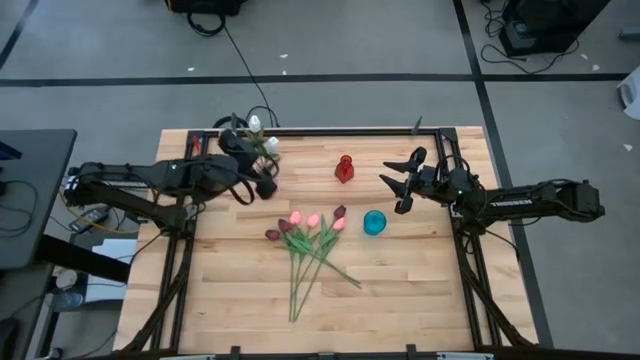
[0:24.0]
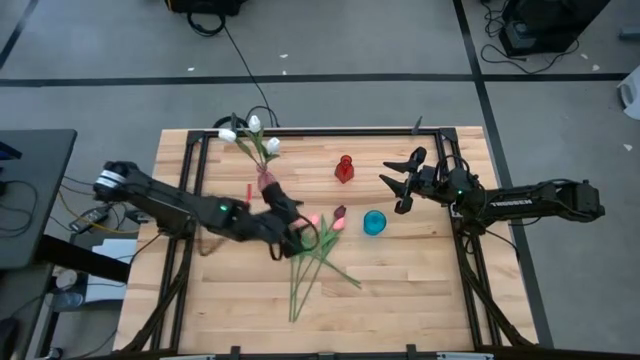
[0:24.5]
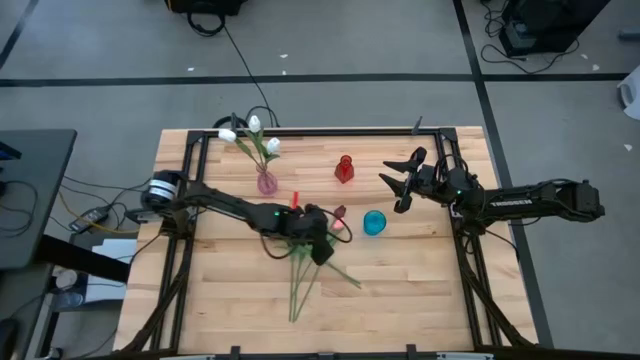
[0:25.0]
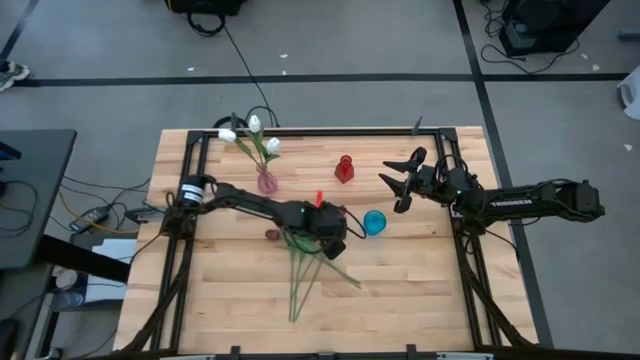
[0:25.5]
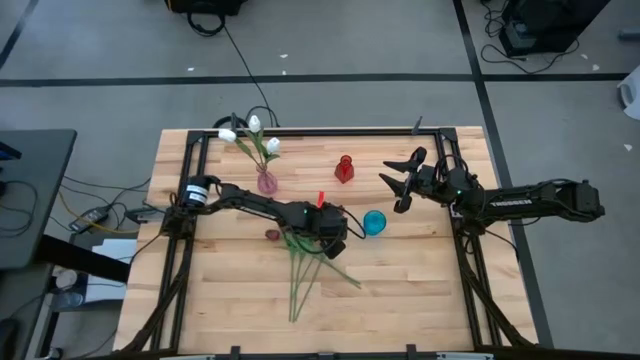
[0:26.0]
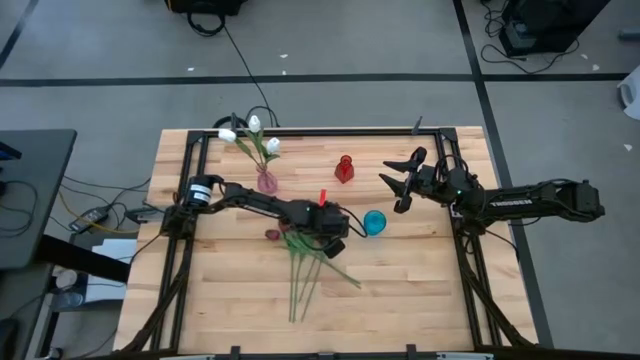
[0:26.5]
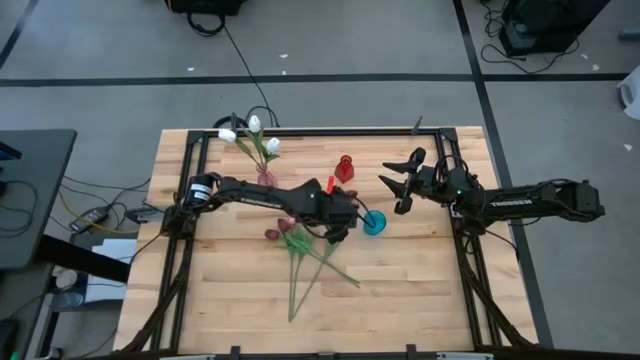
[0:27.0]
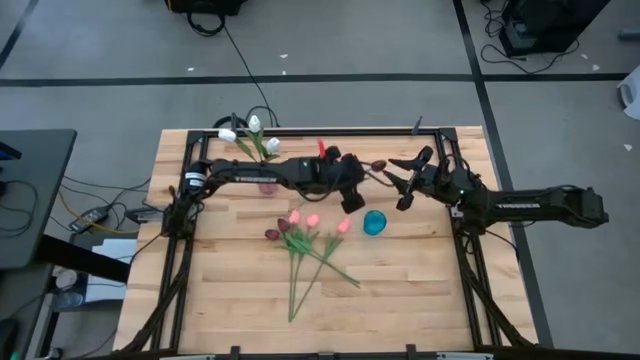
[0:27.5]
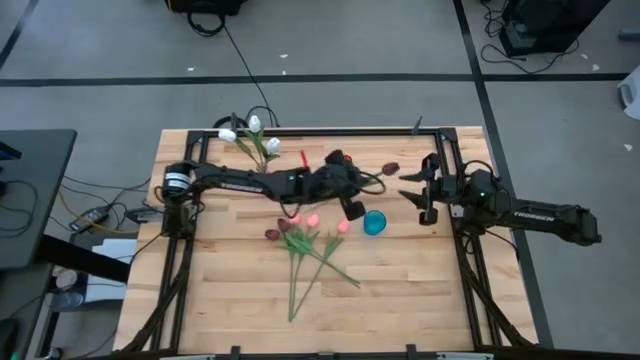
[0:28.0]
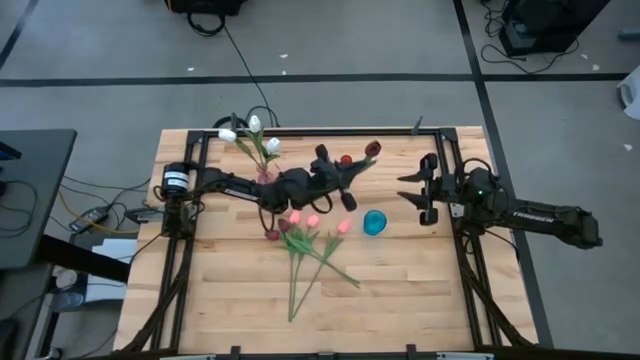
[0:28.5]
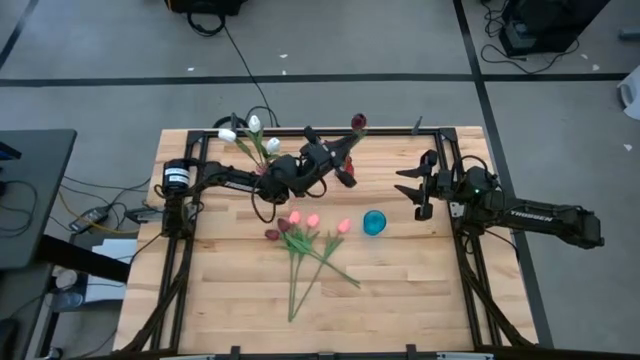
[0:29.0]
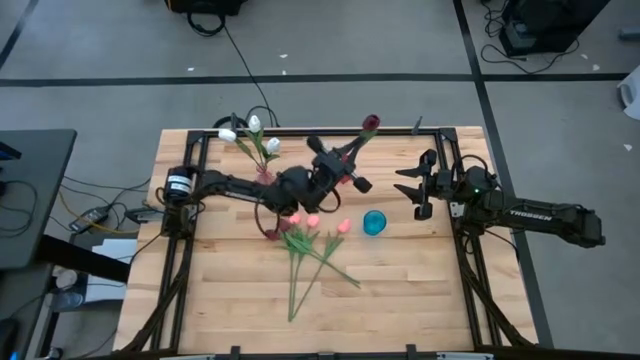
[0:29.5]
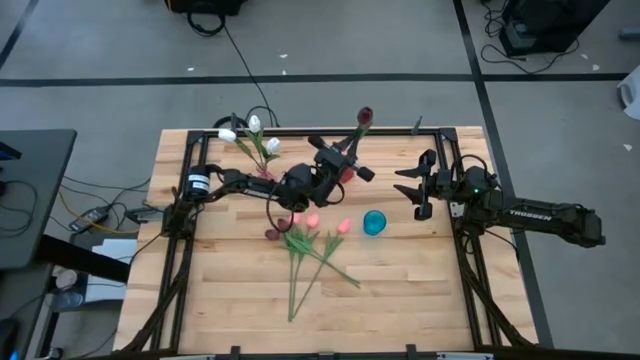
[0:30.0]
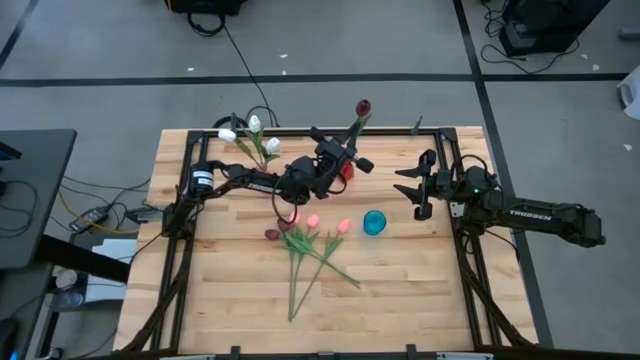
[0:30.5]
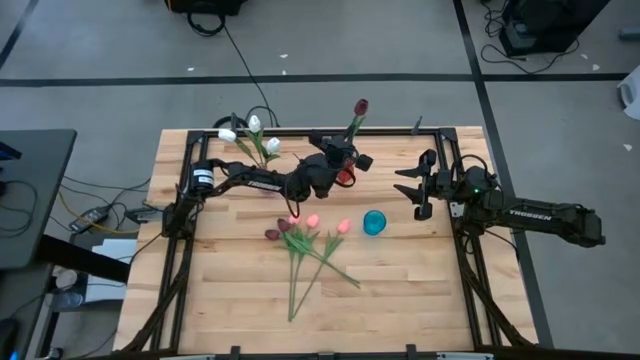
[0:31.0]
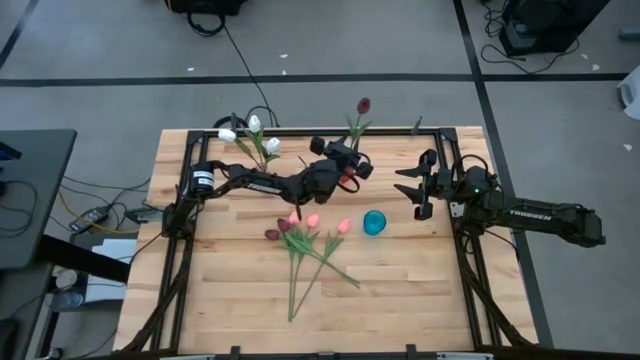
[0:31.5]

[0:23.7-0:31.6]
Task: Sort flowers into vase by color
Put the red tulip into the red vase

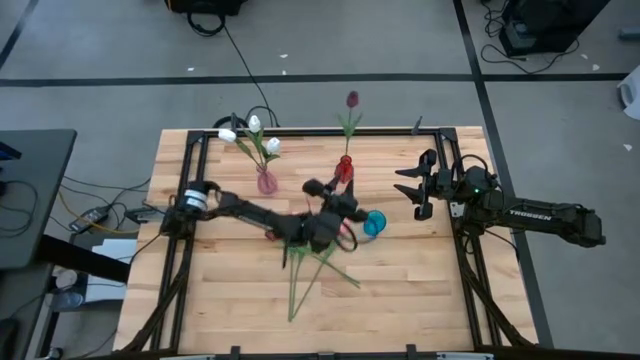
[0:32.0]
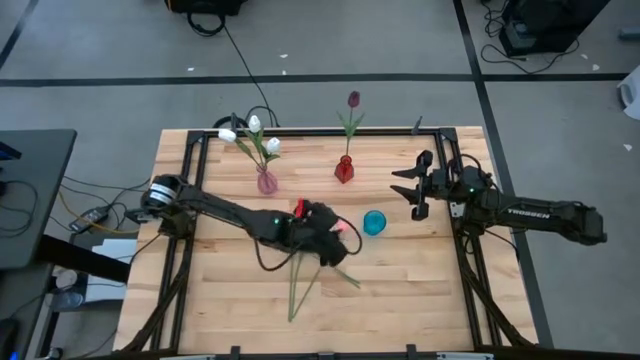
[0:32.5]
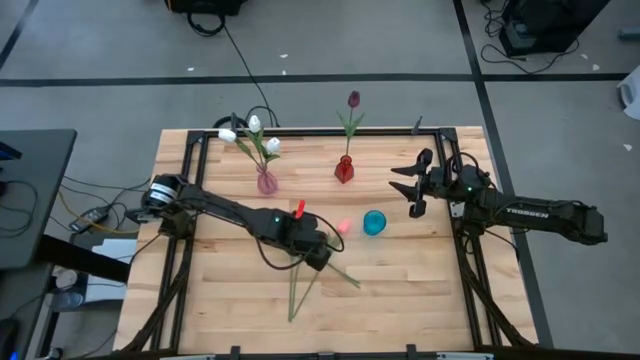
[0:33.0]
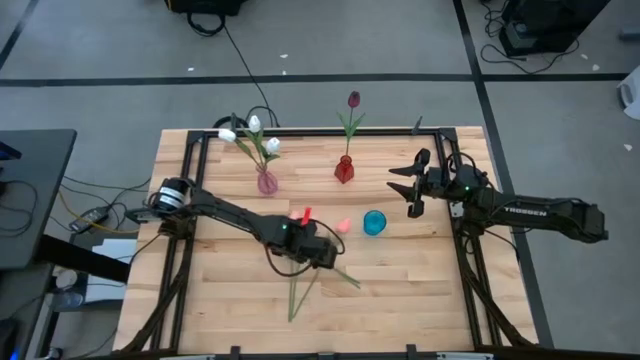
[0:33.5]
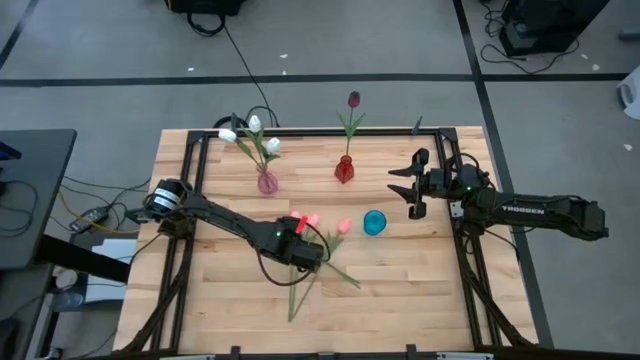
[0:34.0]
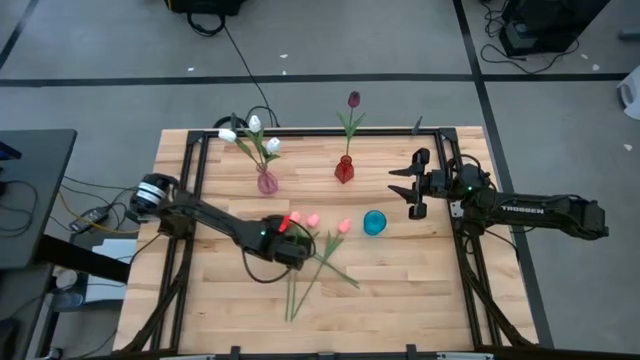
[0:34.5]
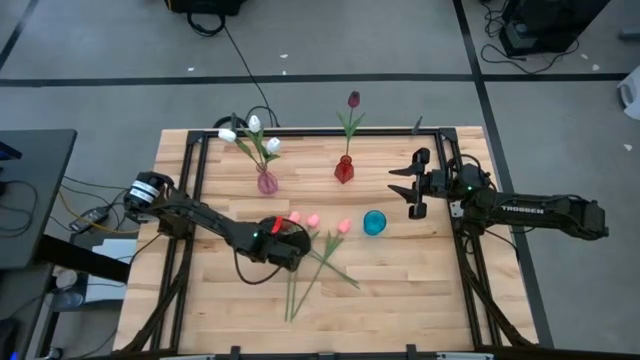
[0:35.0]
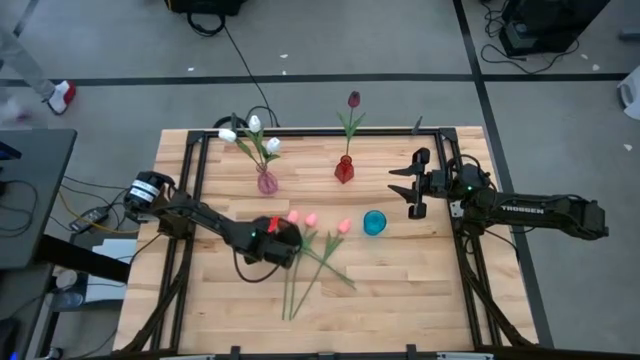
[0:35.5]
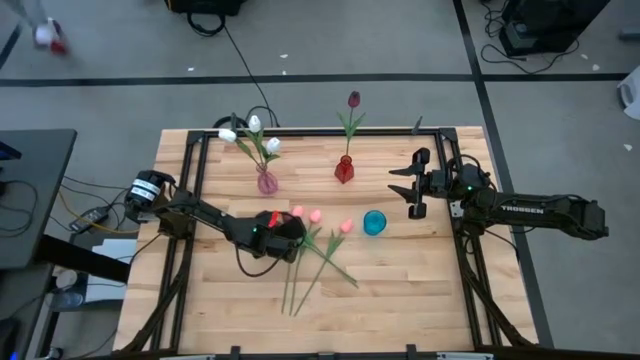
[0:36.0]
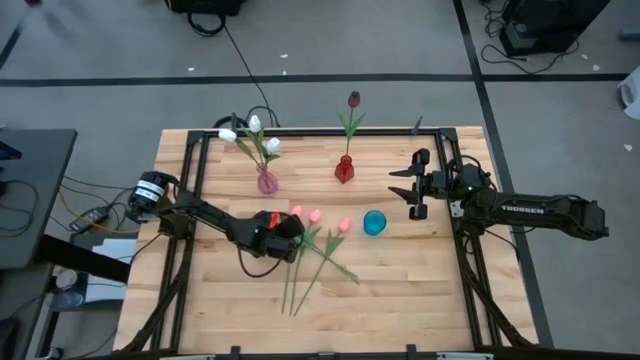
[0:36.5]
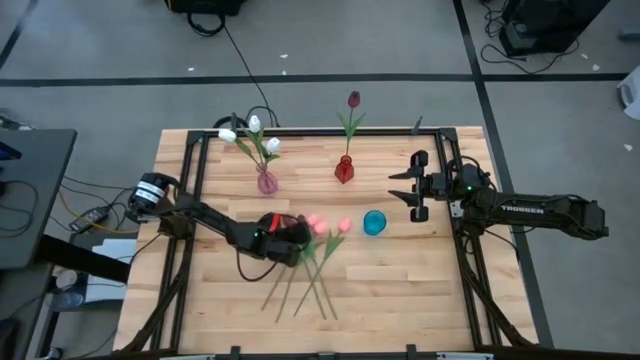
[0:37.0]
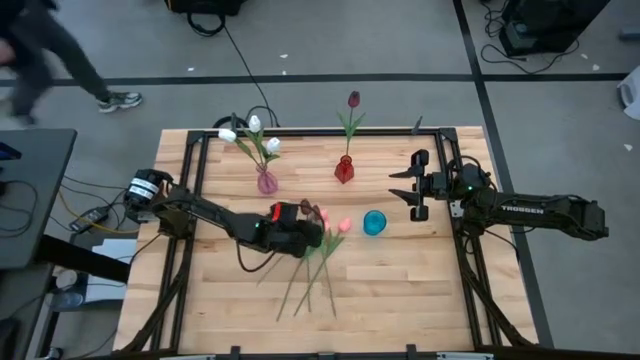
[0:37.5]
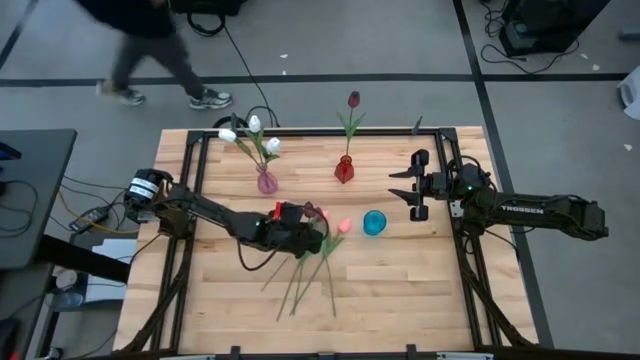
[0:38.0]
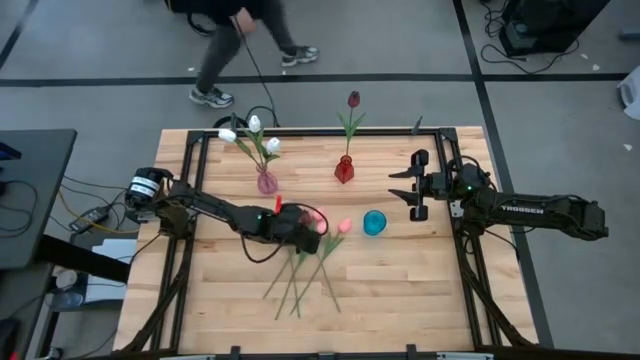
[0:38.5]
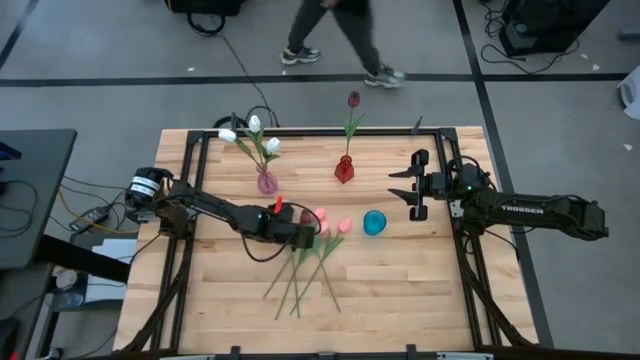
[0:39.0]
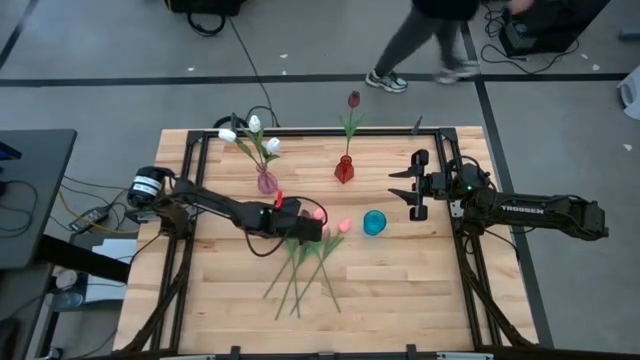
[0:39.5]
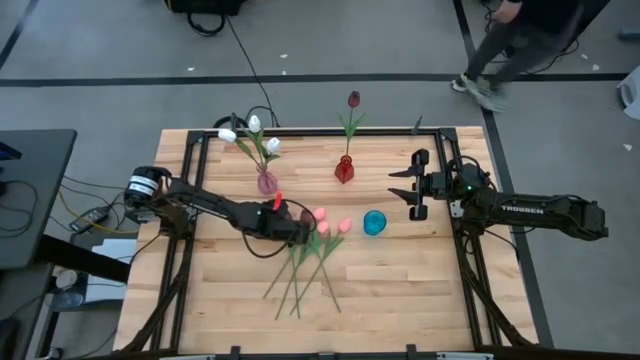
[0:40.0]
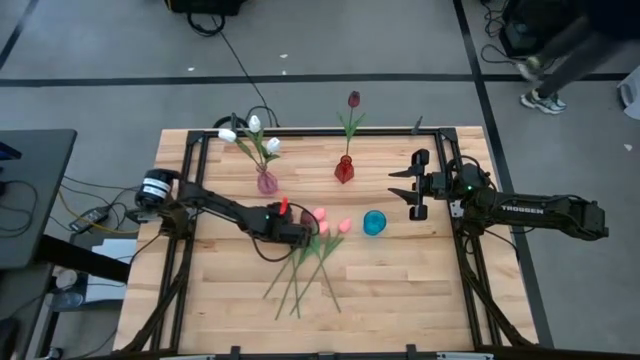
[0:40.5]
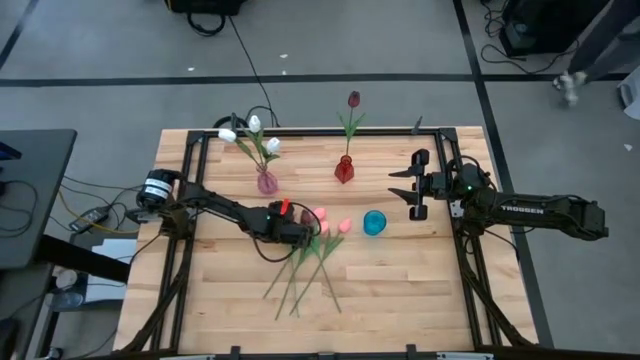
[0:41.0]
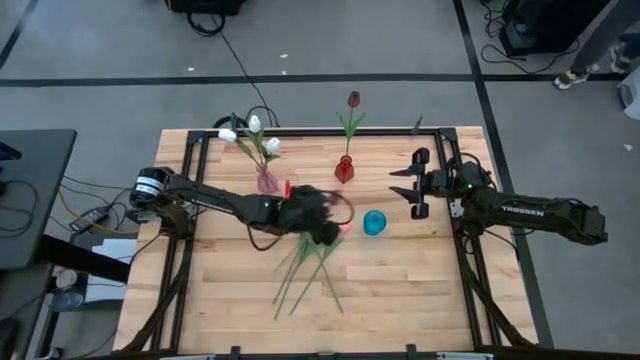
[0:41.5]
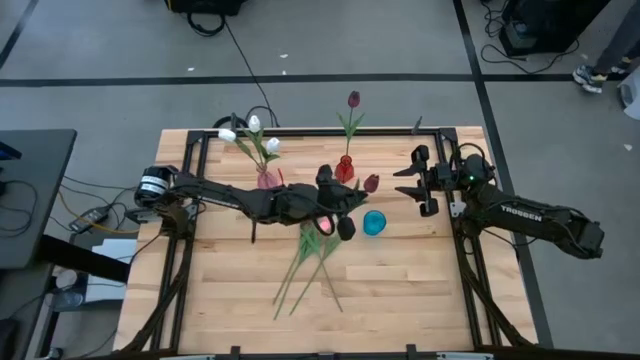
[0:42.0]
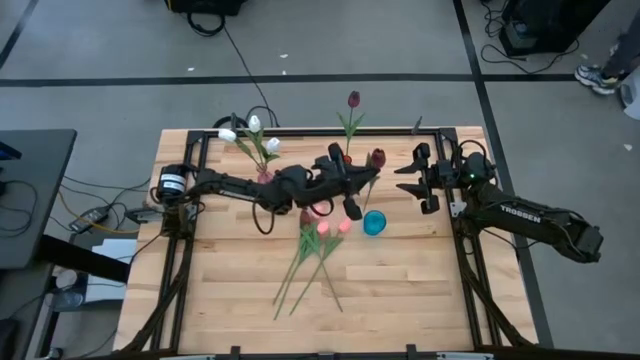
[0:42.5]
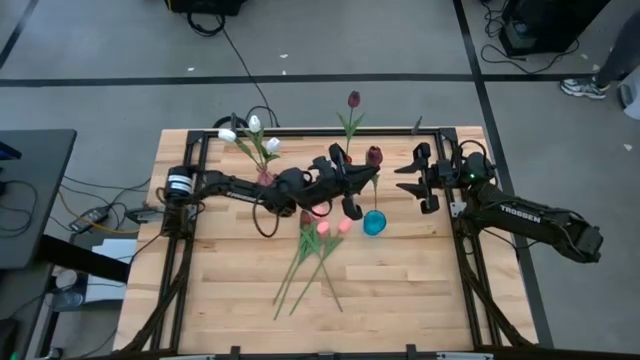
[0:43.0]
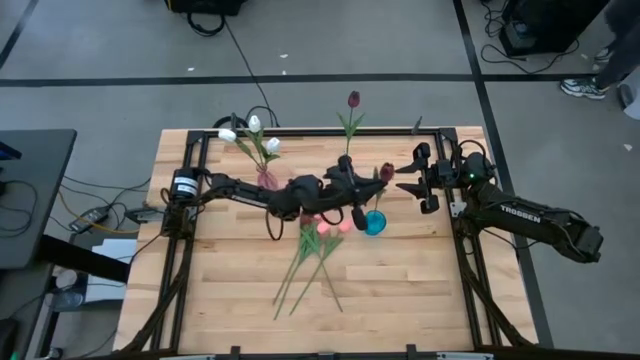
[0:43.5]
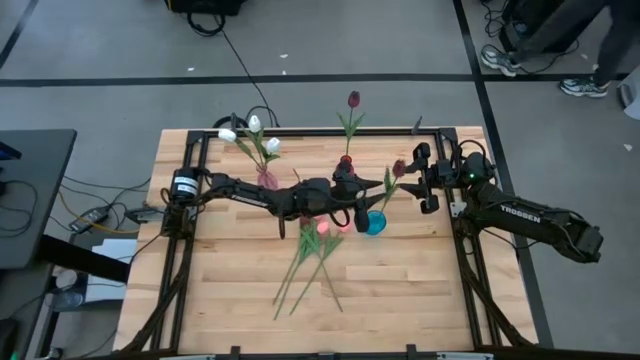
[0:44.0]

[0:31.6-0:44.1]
Put the red tulip into the red vase

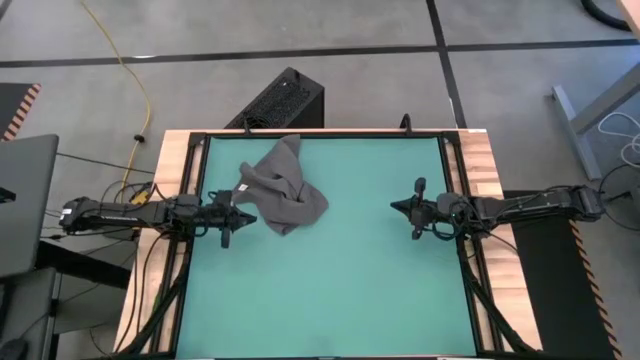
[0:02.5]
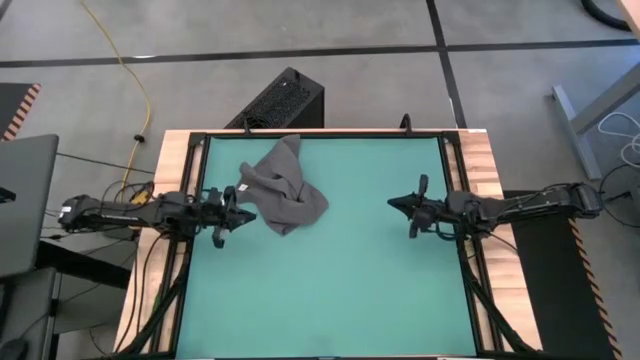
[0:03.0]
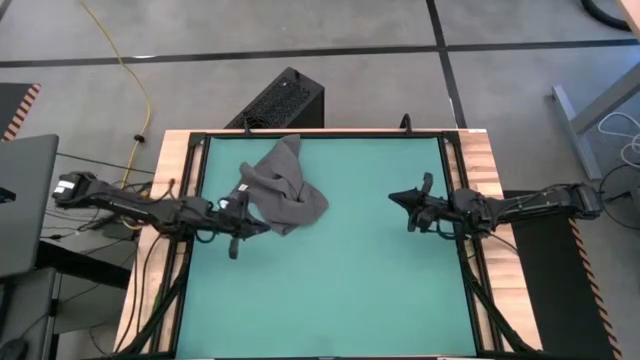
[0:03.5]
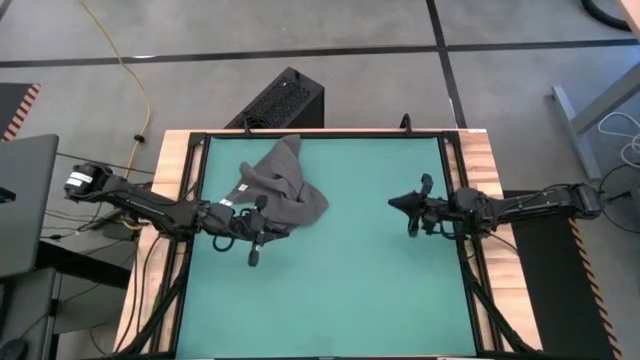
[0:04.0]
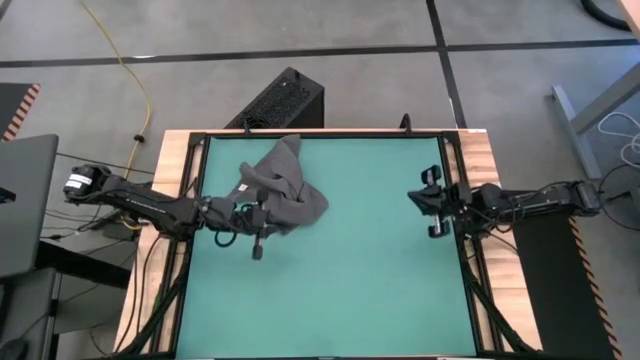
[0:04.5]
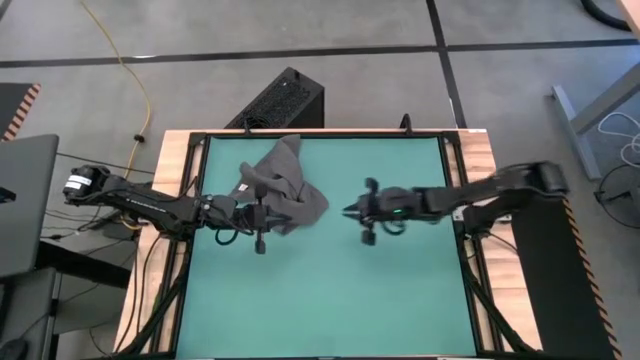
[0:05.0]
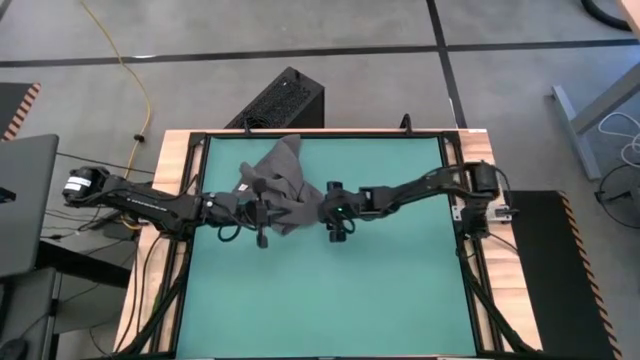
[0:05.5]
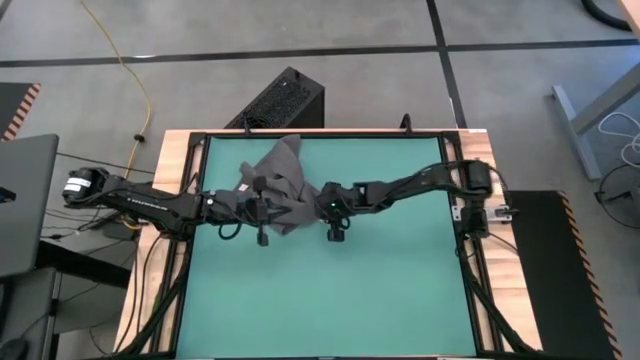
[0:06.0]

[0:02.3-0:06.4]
Task: Roll towel into tight, uniform cylinder
Fold the gray towel
